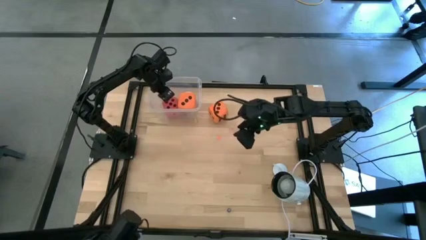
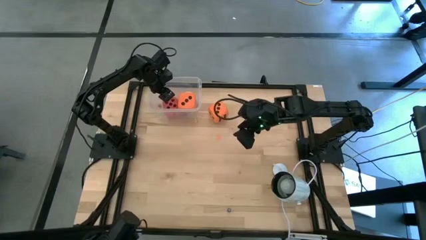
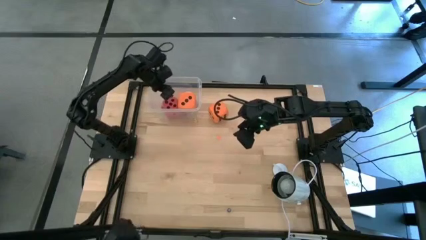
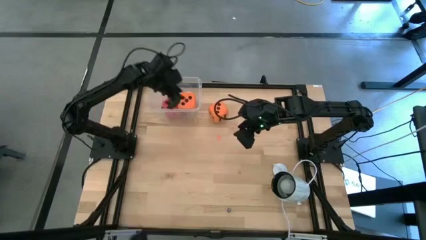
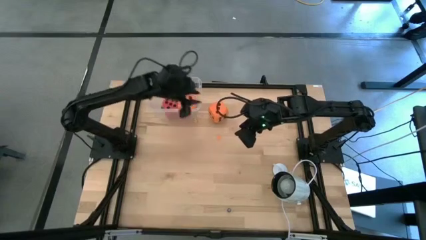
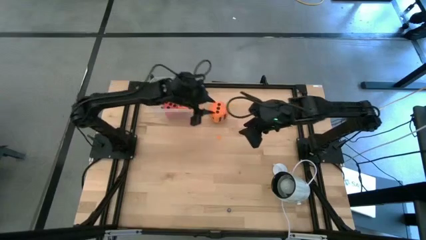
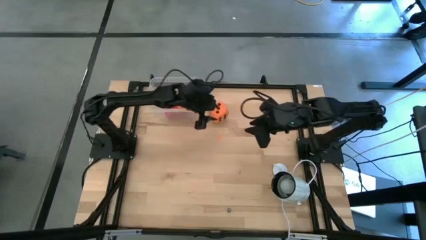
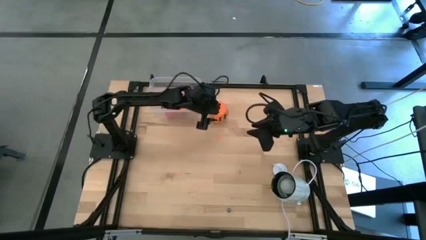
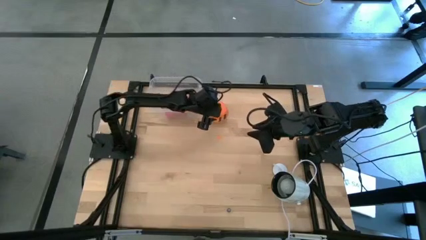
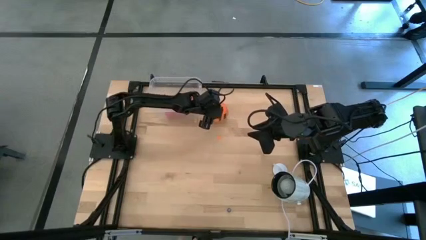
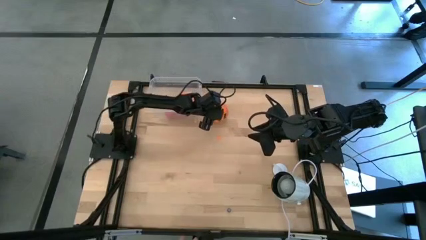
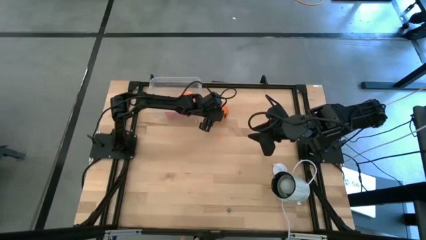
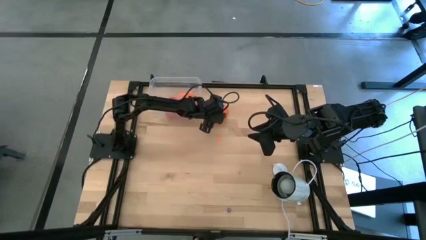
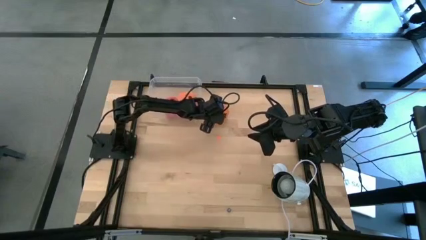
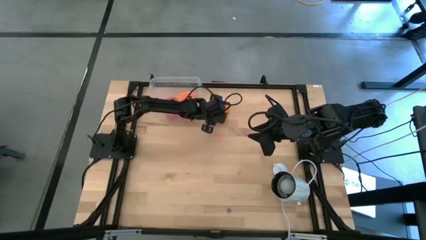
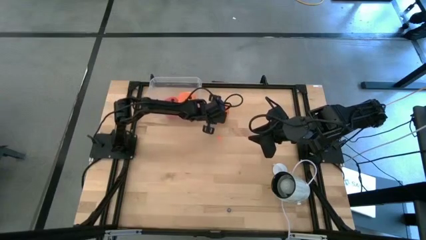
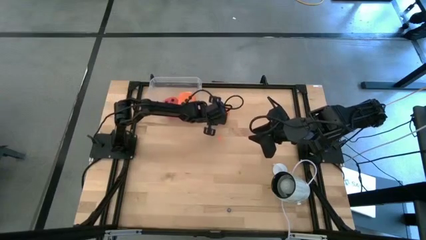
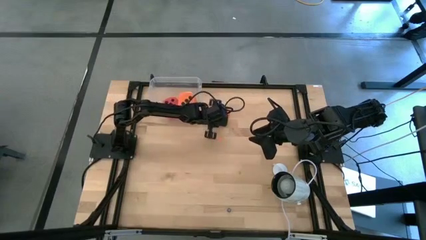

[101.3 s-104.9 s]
Task: Pick & Place Dice
Put the large orange die into the transparent bin

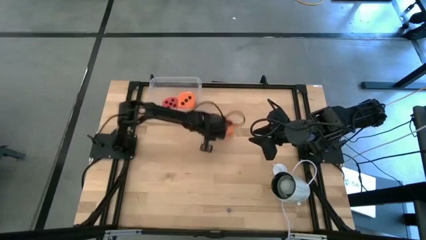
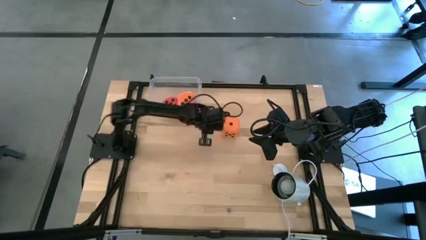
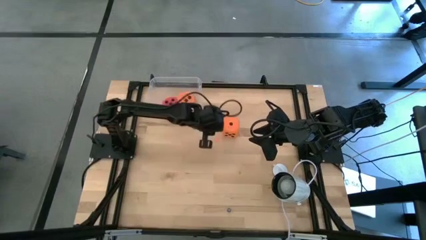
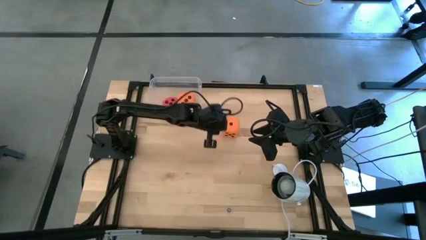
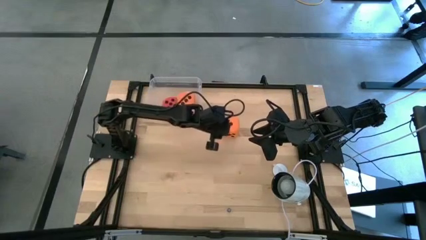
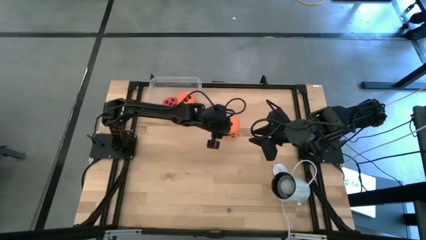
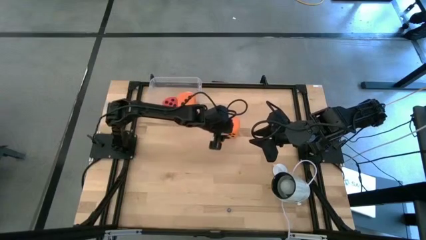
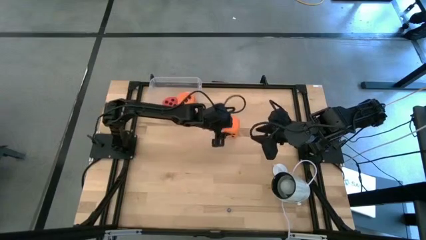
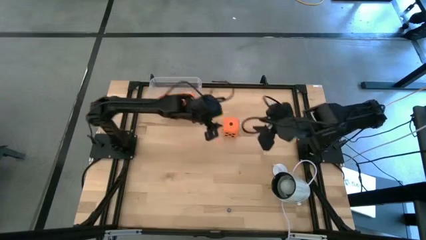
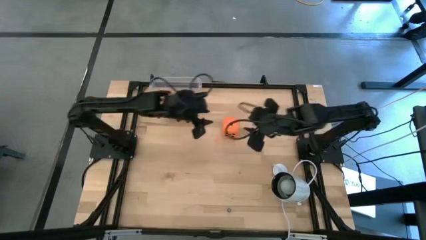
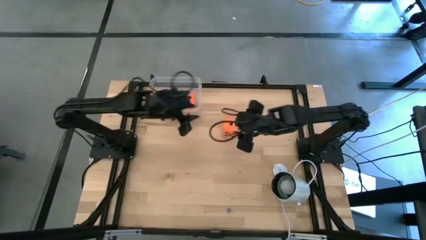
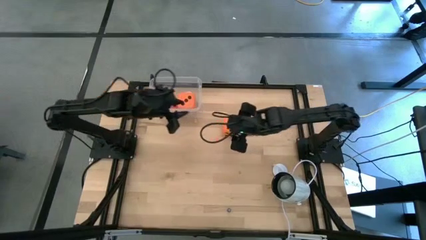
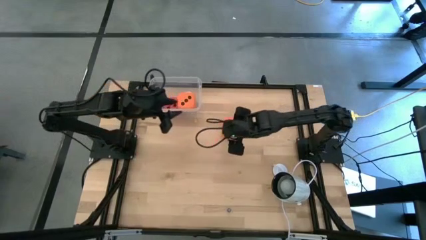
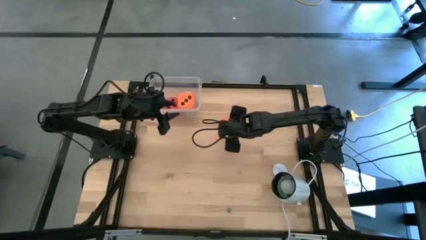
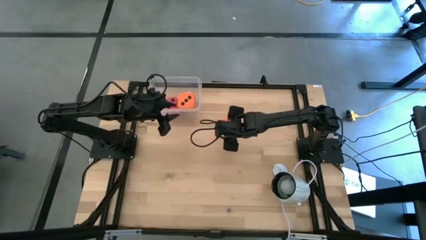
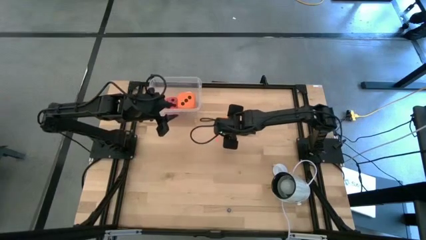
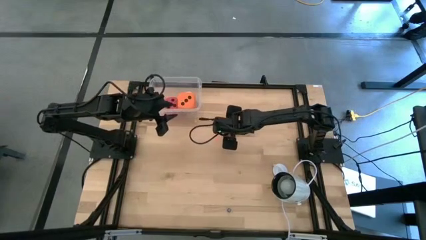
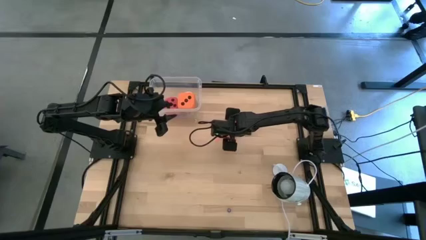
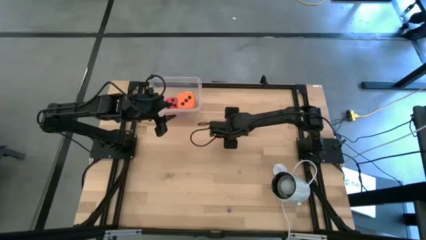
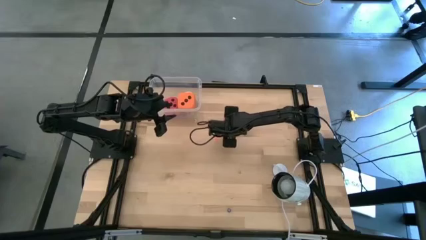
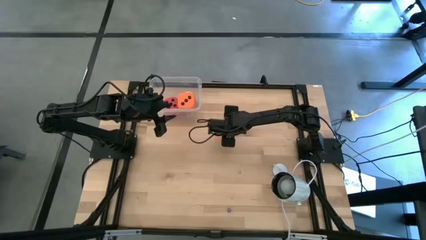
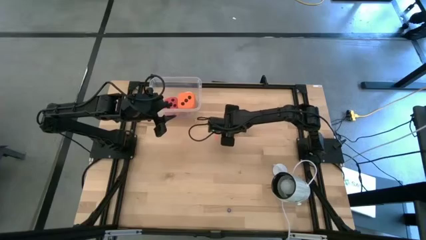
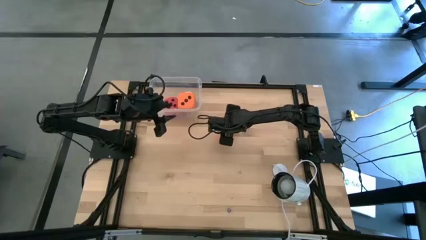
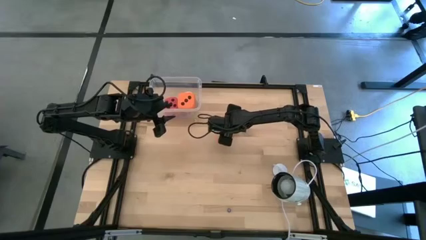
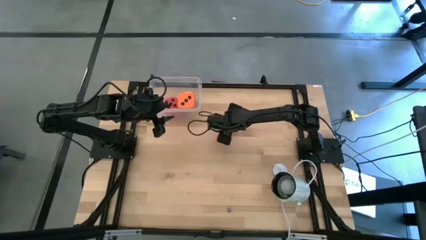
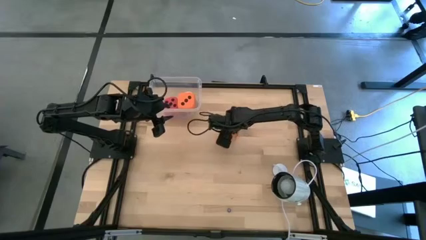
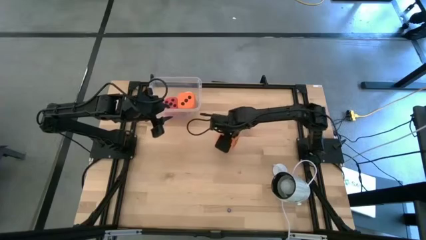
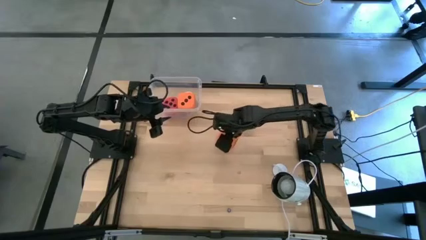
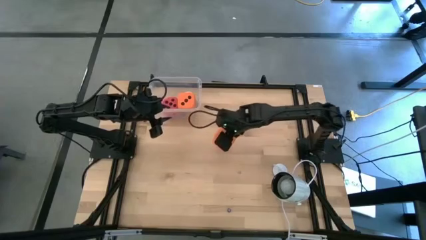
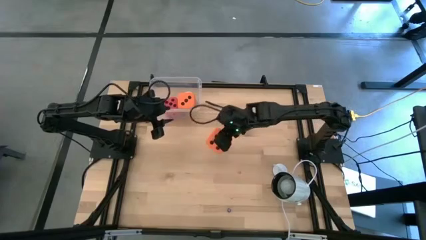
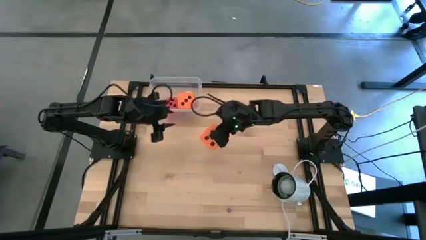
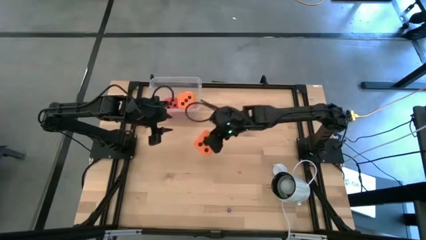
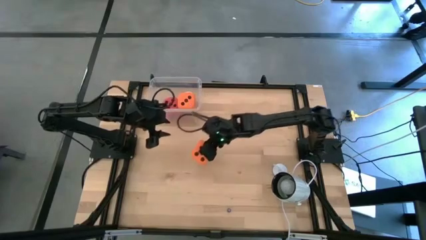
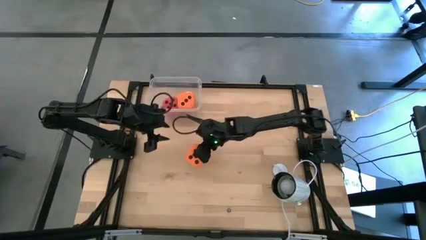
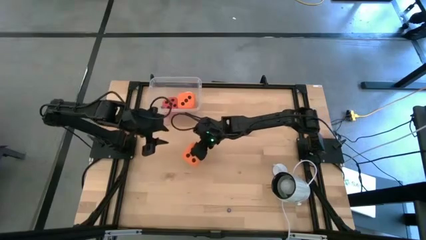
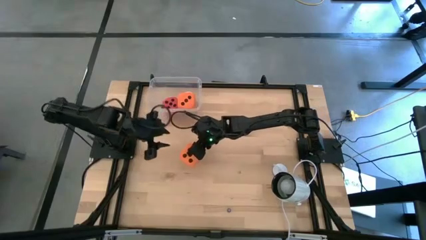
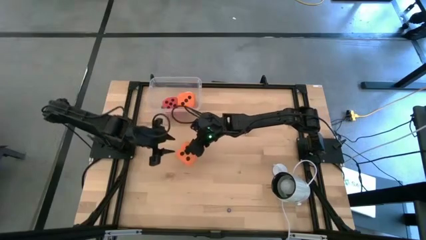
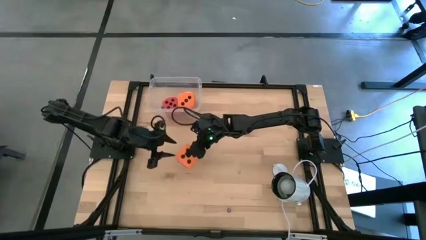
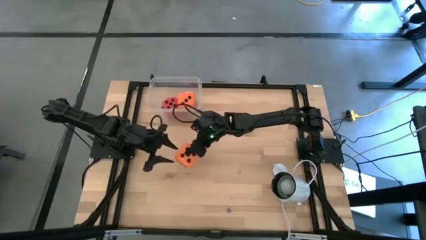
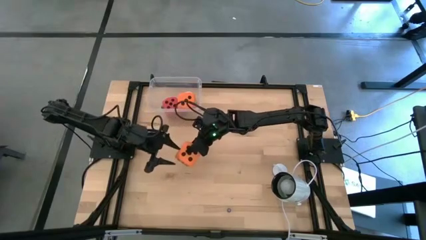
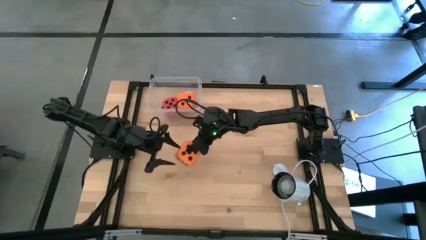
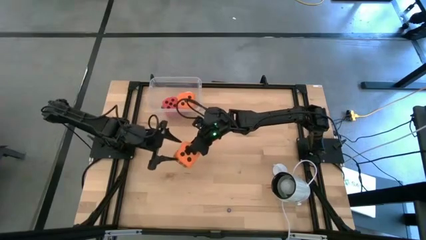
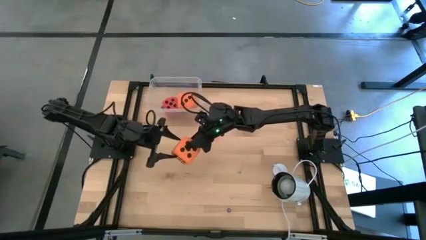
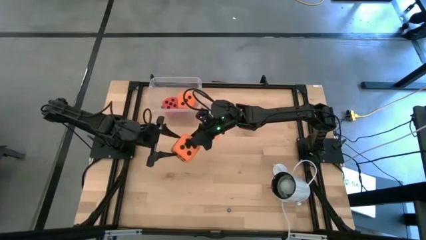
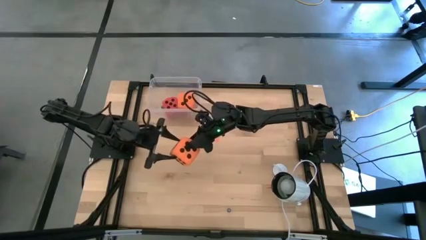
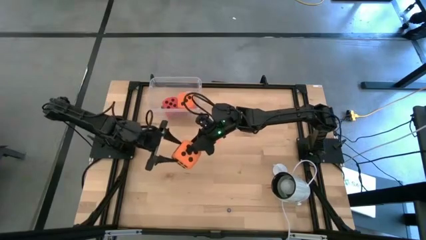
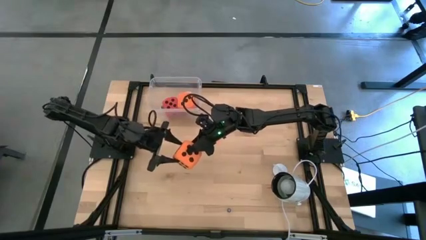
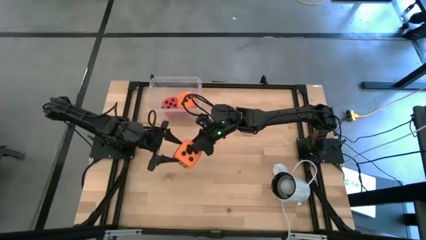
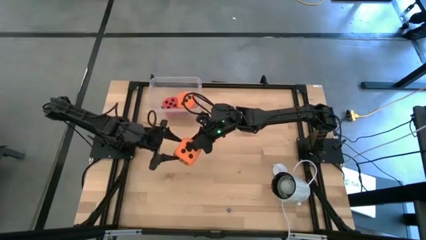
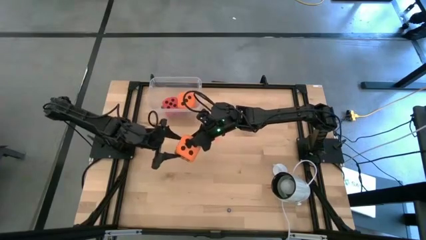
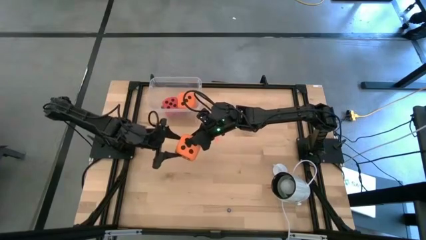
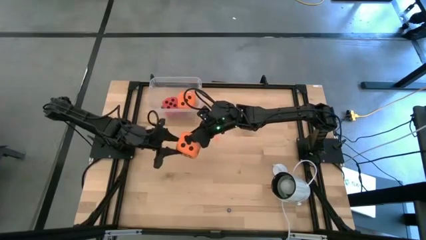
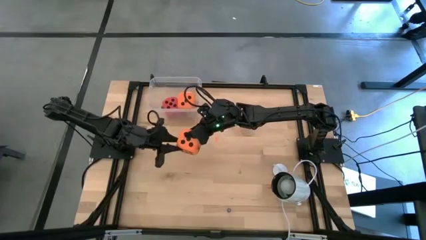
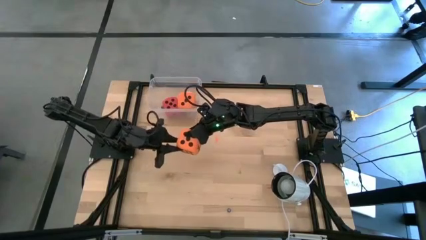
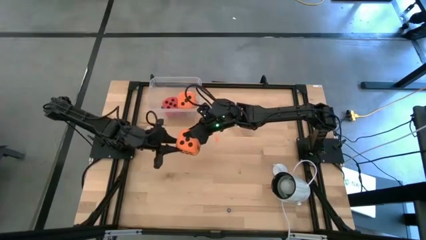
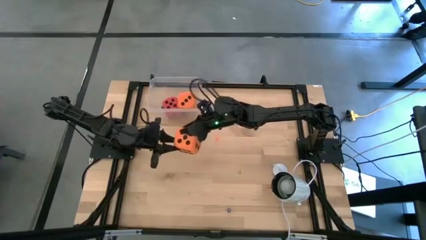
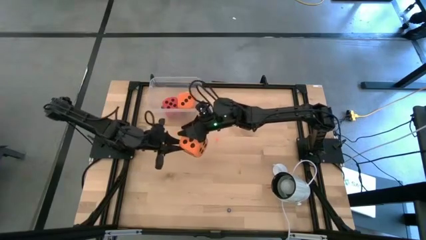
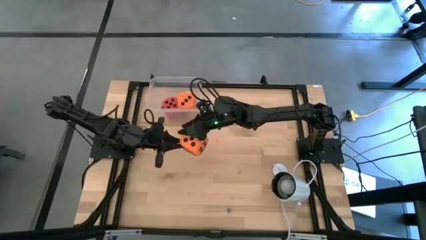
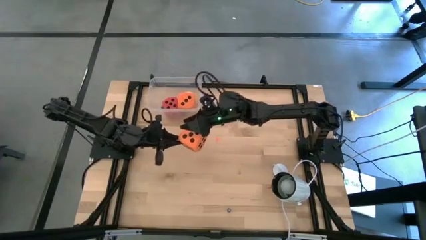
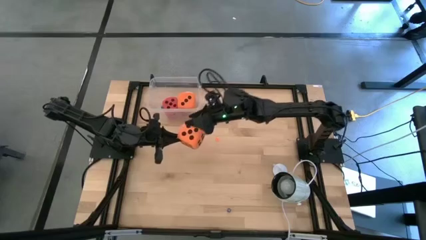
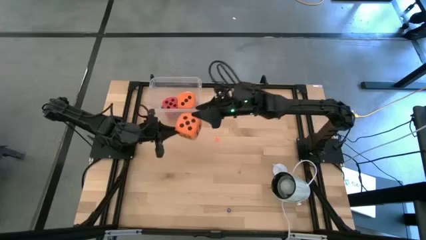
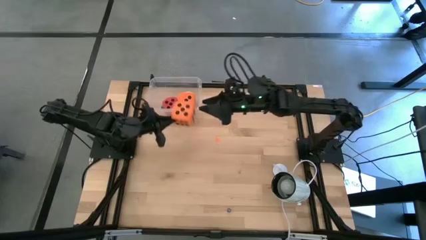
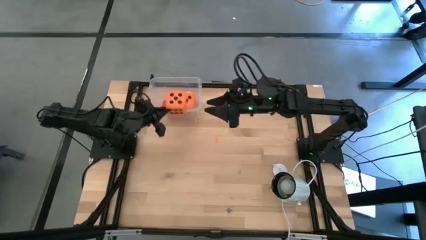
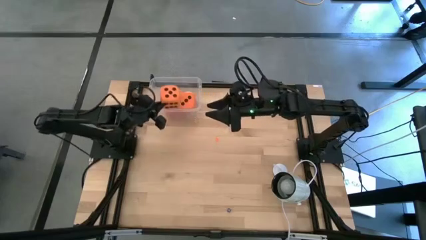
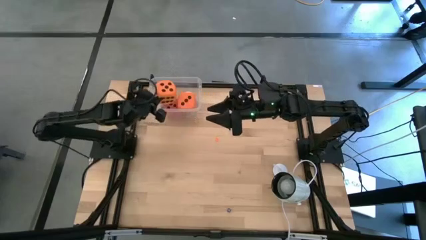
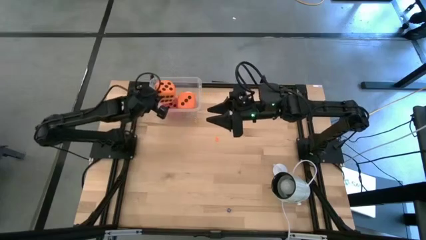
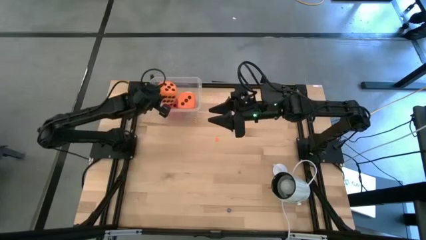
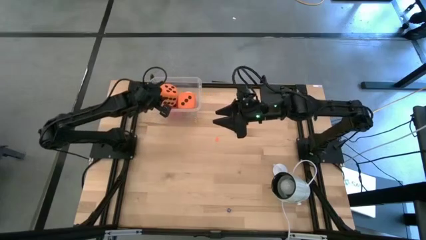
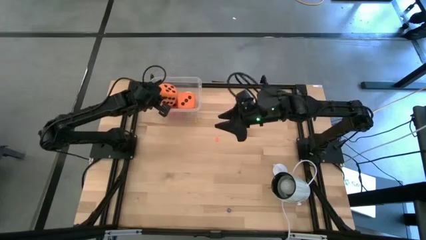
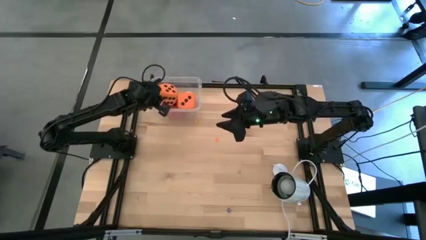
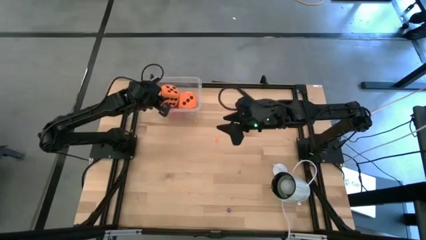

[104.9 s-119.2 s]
Put the large orange die into the transparent bin
